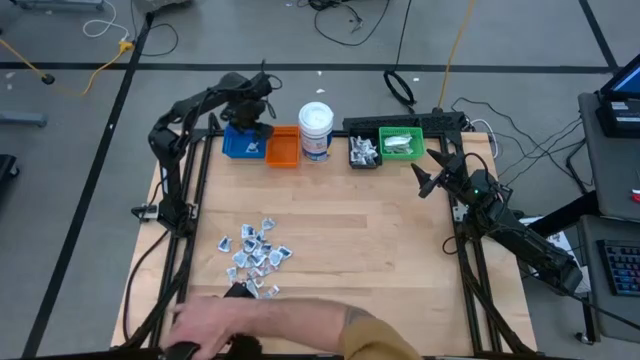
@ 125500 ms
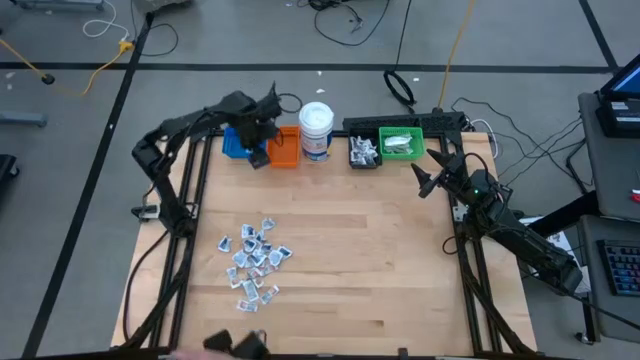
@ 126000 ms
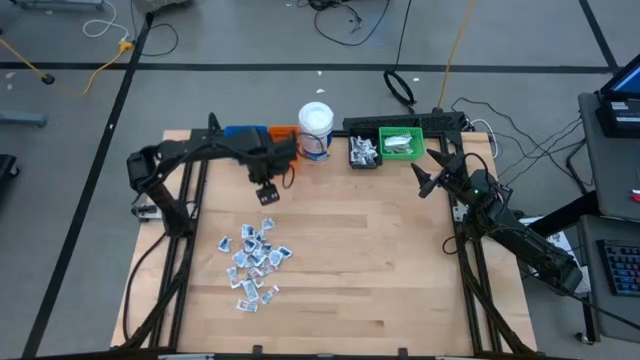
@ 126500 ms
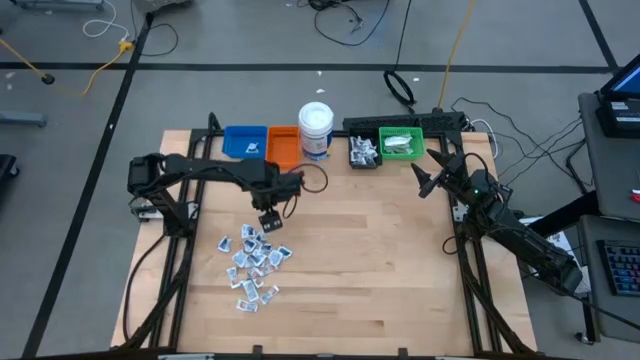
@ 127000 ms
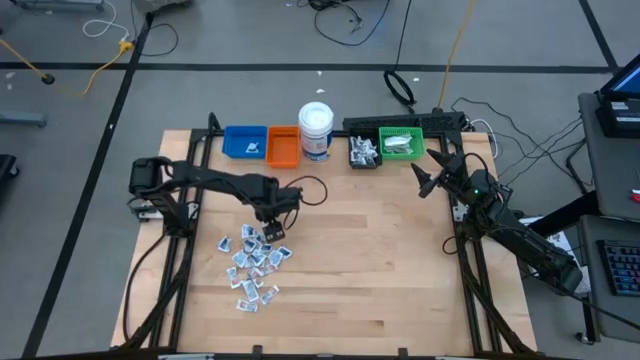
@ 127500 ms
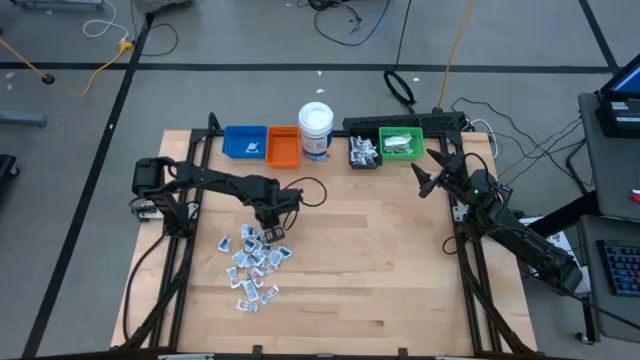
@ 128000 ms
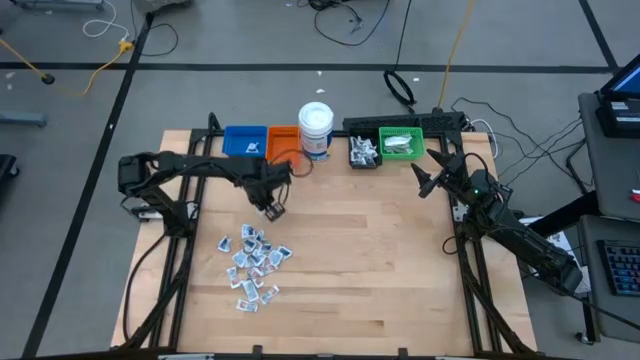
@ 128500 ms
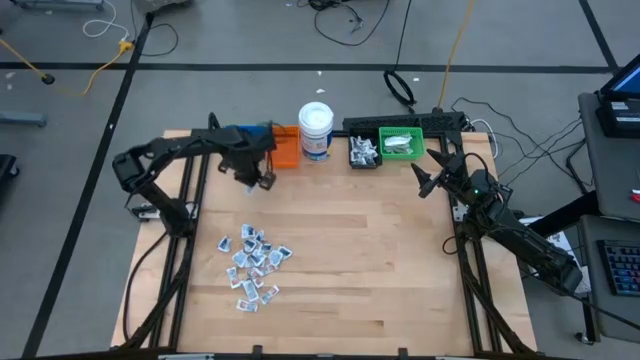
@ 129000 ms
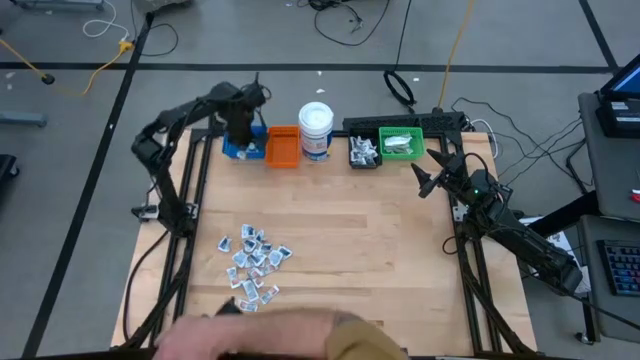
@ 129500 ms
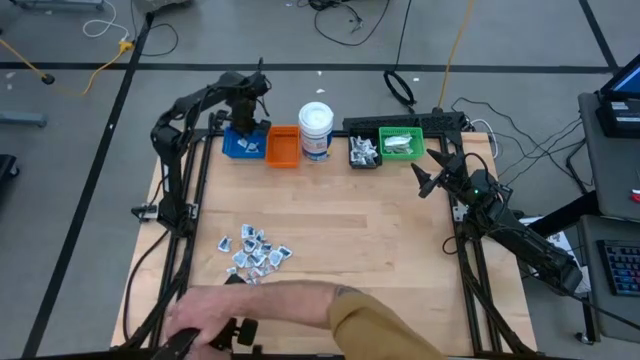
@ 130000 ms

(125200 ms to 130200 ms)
Task: Pick & Place First Aid Supplies
Put the alcohol pad into the blue bin

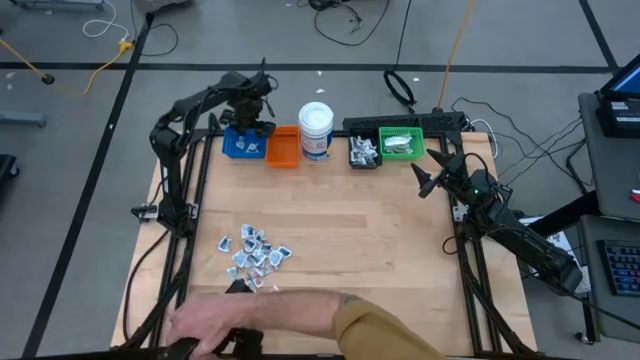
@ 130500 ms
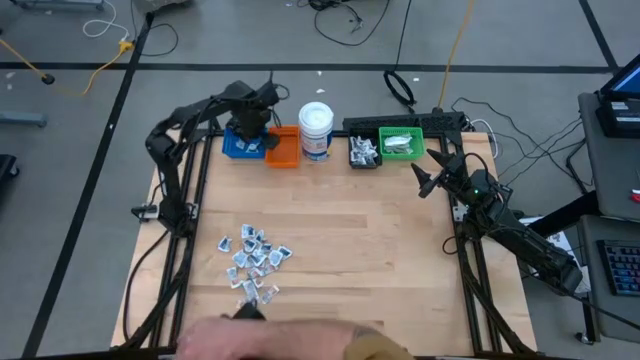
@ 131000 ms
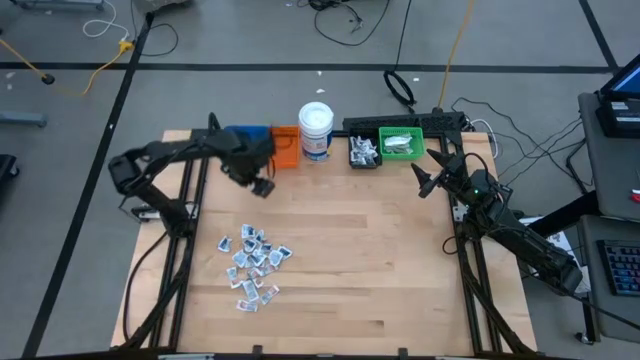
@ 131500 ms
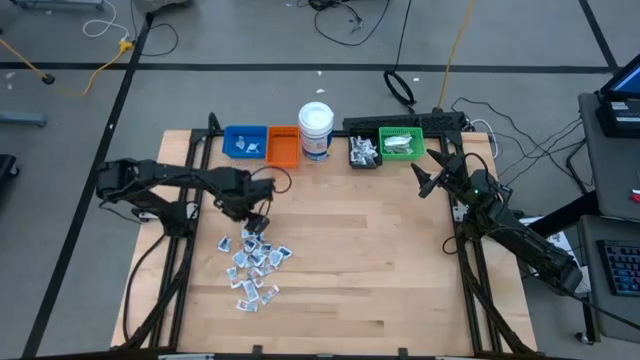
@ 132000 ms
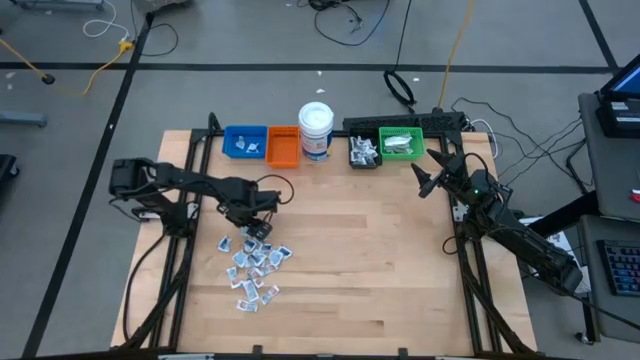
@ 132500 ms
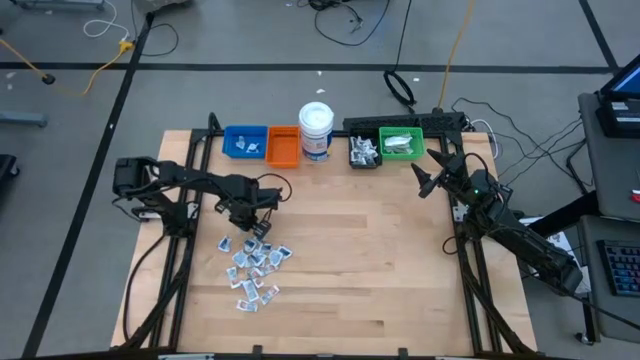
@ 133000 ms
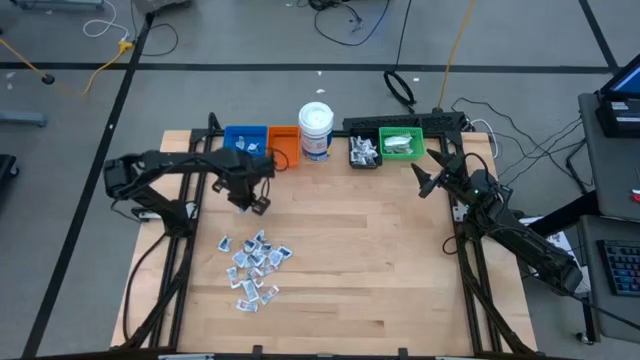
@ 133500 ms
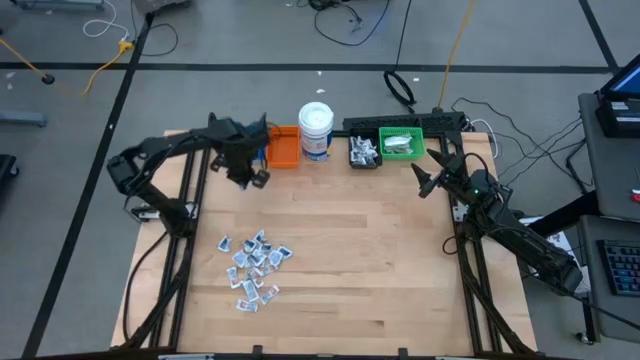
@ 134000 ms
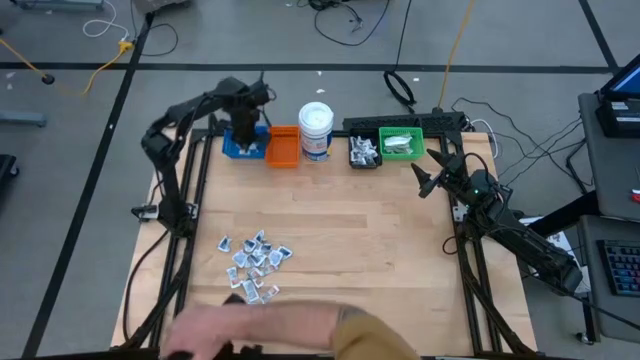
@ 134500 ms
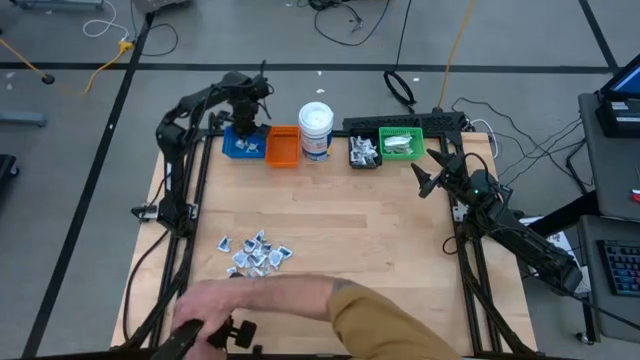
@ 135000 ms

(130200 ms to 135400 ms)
Put the alcohol pad into the blue bin

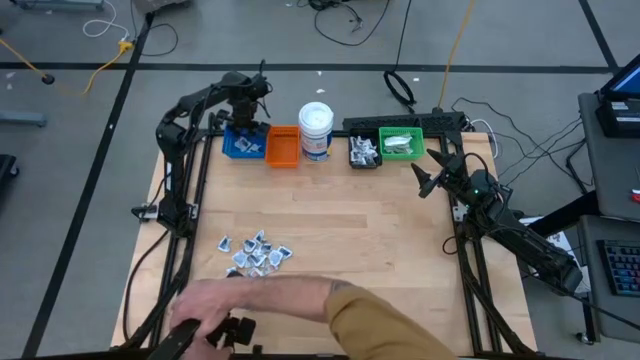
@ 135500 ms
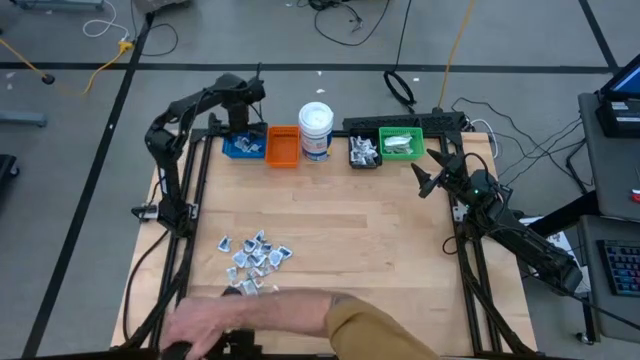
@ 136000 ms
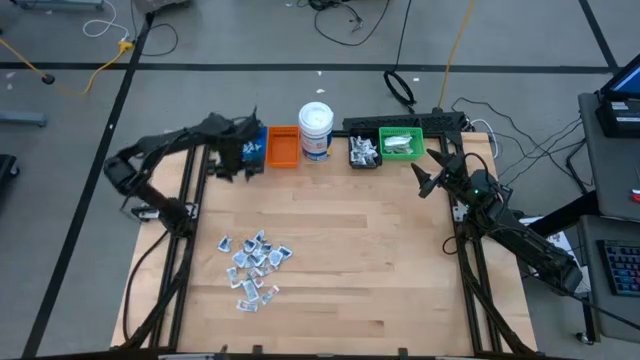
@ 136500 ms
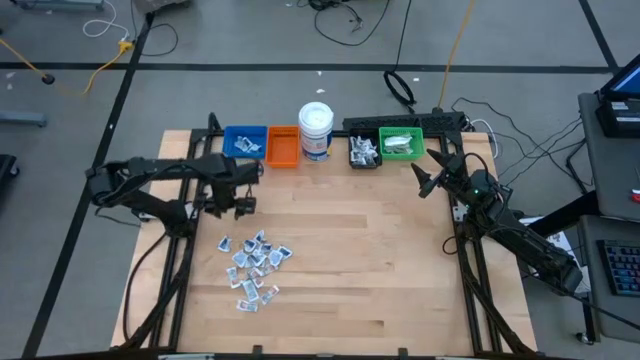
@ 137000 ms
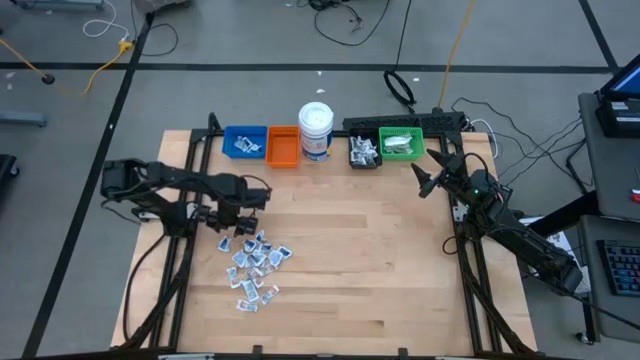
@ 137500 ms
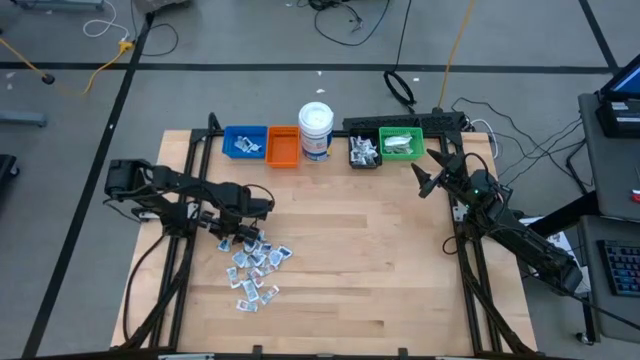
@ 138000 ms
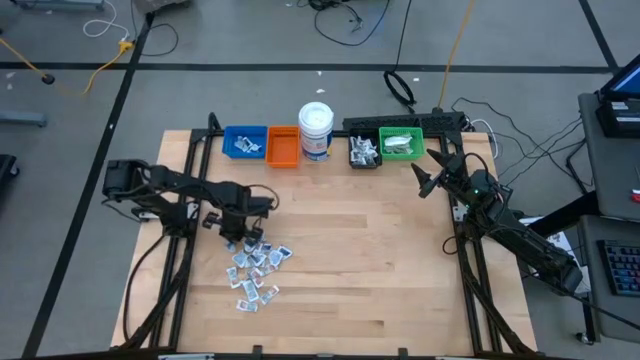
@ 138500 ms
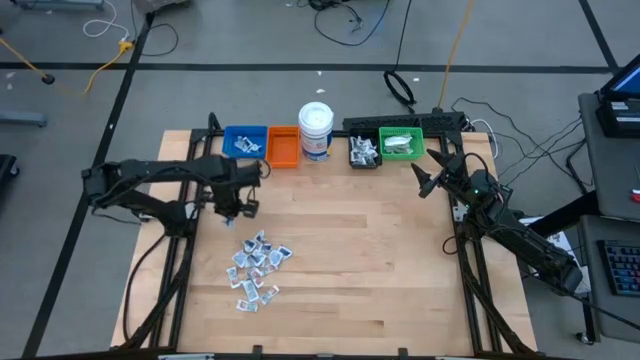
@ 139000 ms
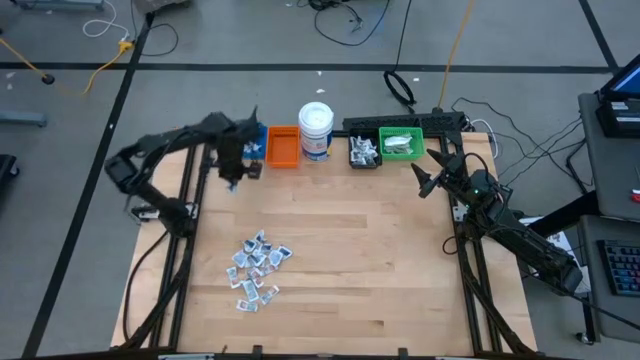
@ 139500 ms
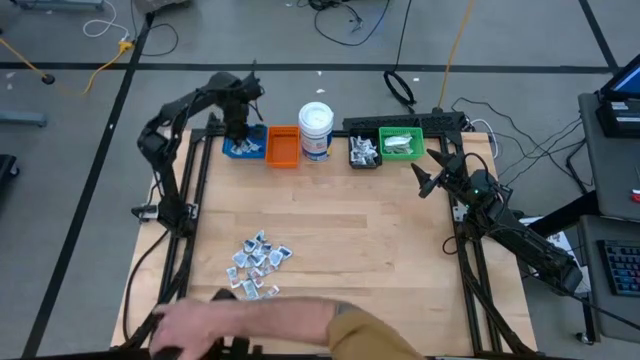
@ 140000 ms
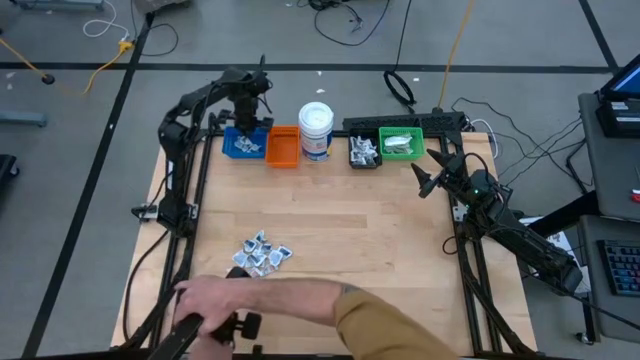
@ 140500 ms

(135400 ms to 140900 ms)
Put the alcohol pad into the blue bin

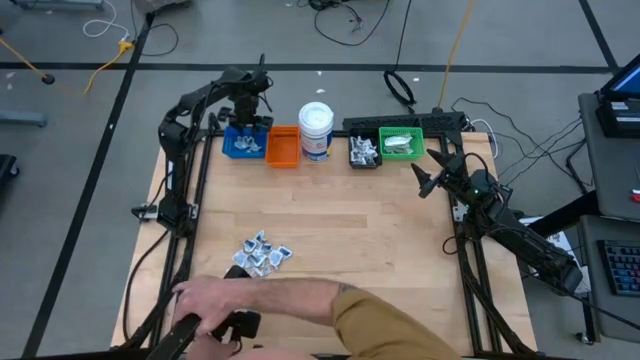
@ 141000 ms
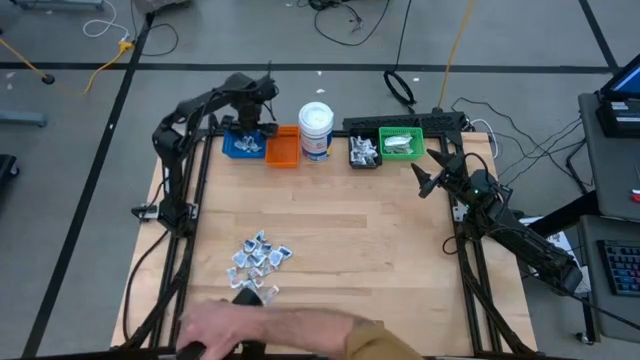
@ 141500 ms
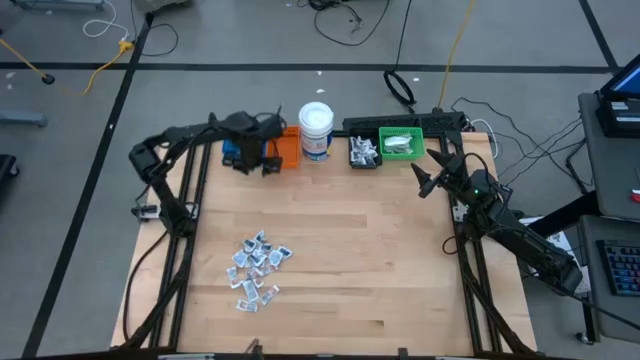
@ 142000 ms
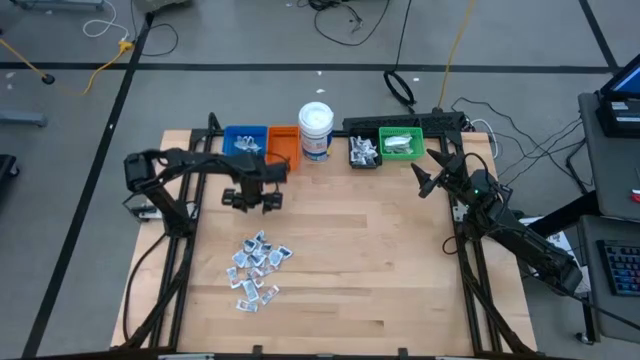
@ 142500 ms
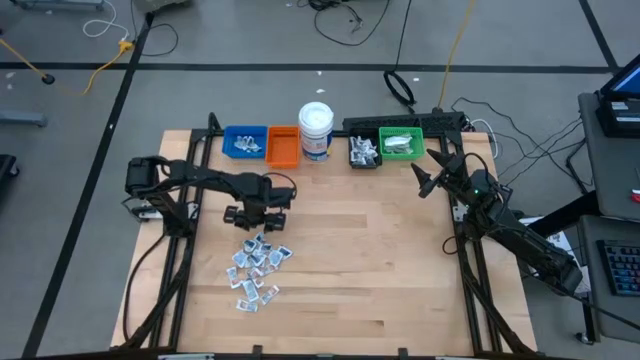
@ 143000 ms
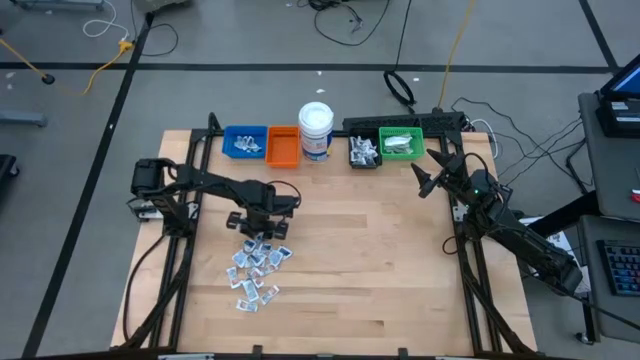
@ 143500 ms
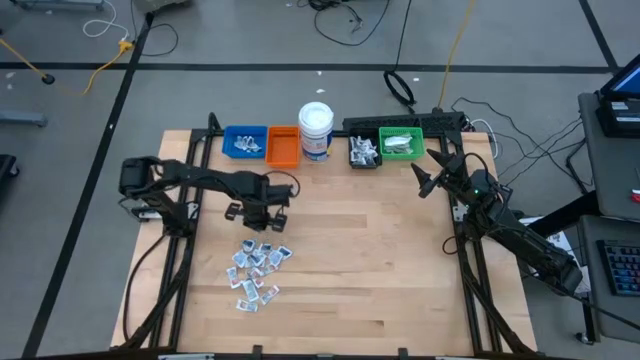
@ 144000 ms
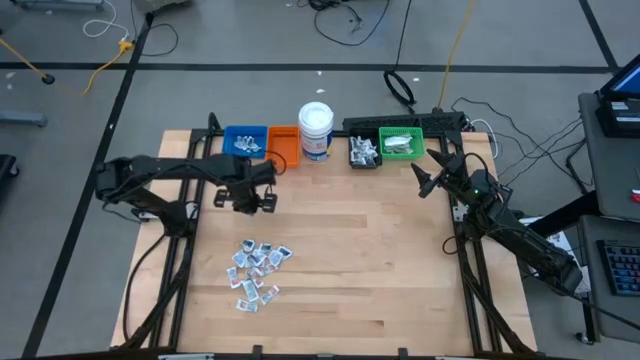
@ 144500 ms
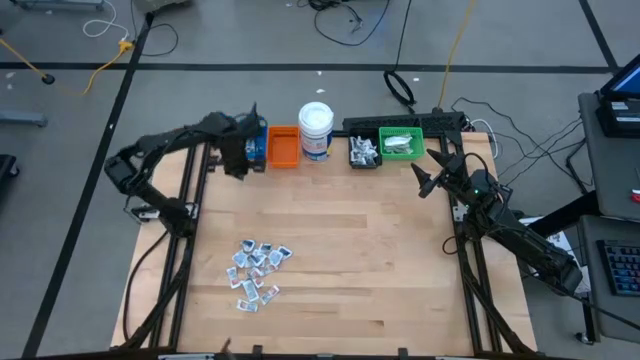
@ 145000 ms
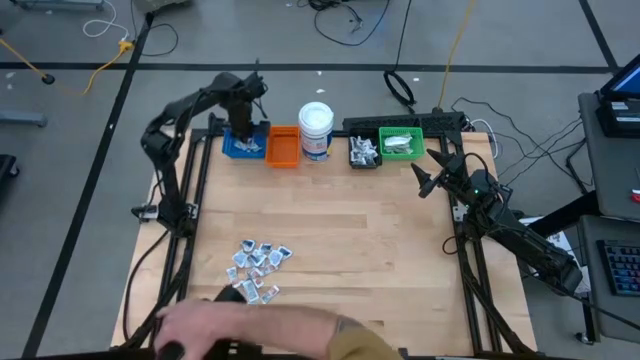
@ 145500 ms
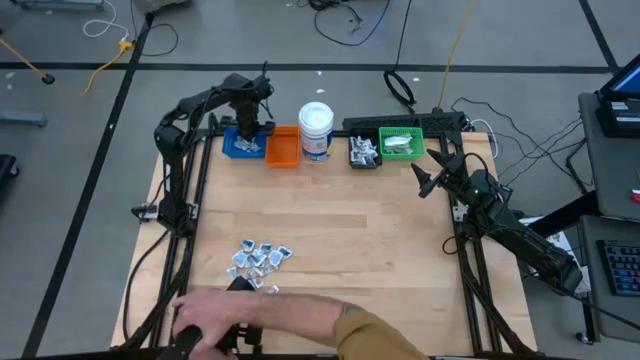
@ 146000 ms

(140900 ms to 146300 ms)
Put the alcohol pad into the blue bin
